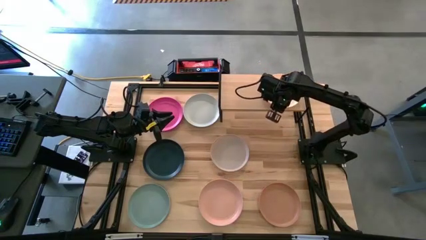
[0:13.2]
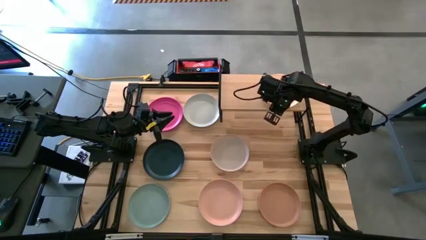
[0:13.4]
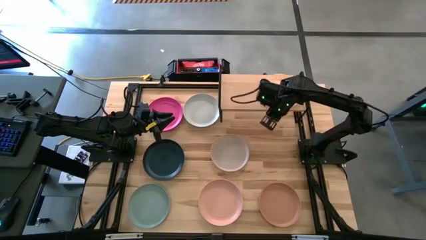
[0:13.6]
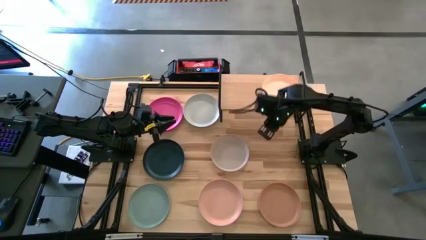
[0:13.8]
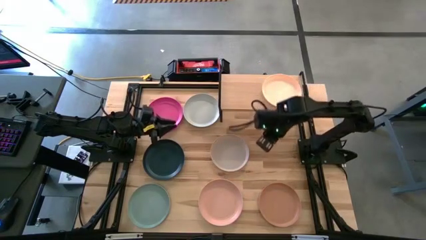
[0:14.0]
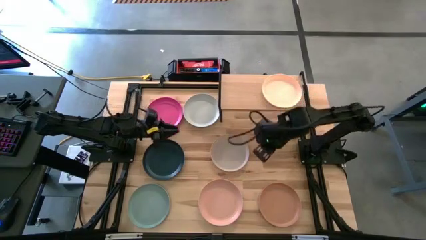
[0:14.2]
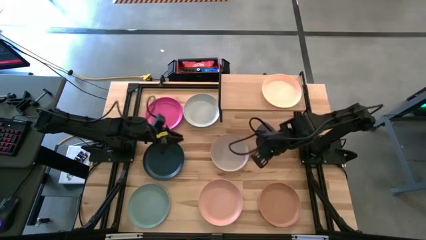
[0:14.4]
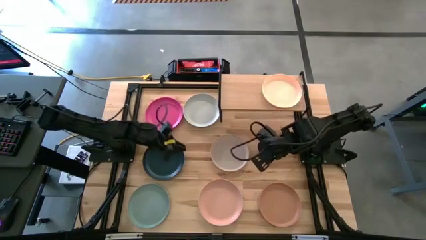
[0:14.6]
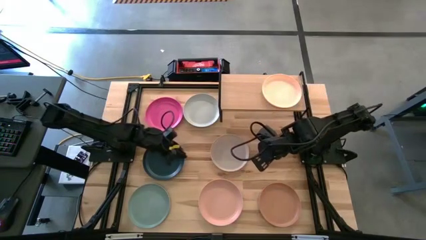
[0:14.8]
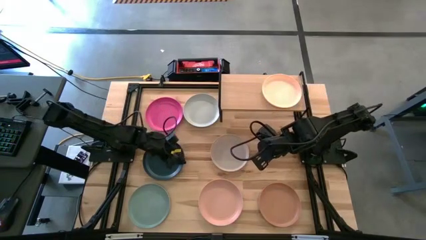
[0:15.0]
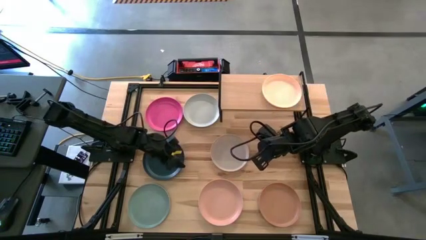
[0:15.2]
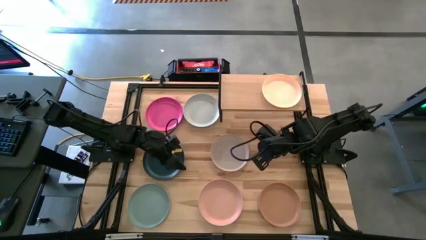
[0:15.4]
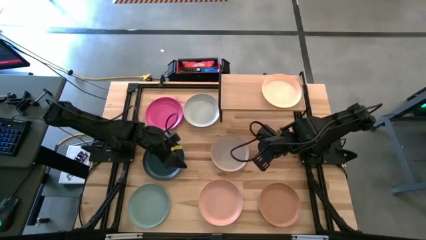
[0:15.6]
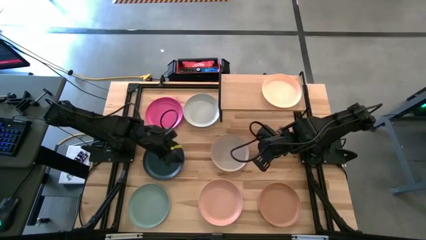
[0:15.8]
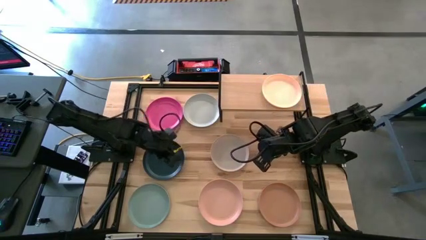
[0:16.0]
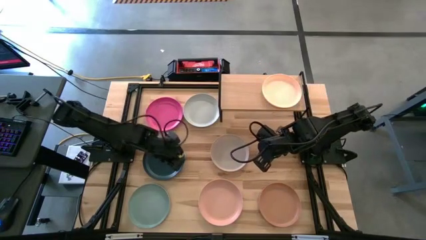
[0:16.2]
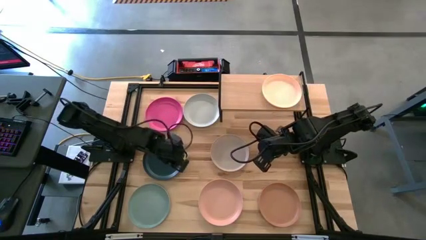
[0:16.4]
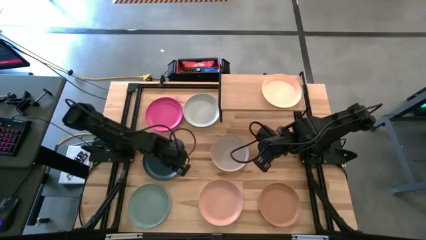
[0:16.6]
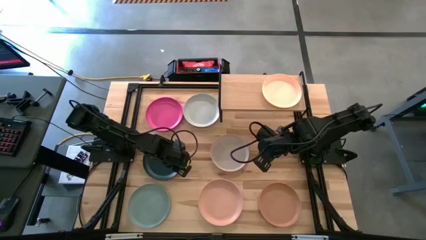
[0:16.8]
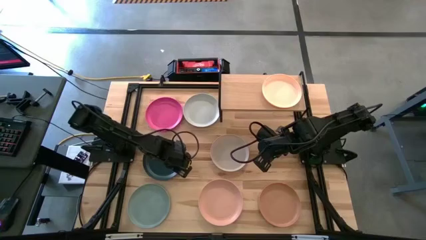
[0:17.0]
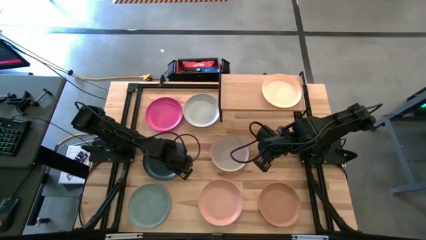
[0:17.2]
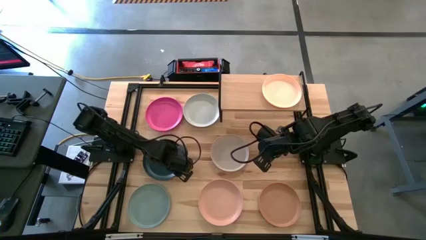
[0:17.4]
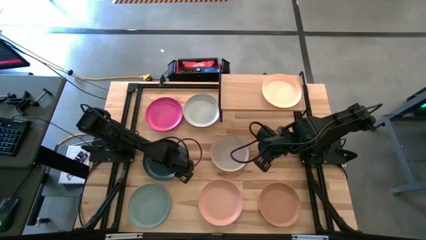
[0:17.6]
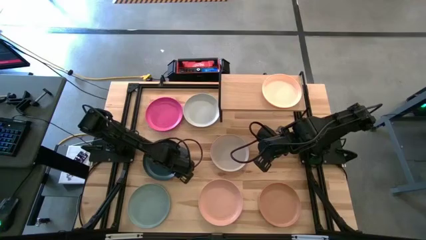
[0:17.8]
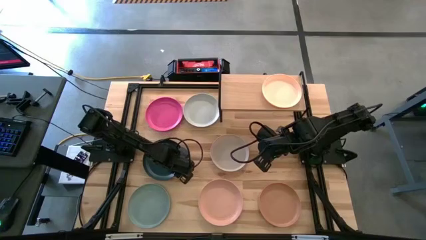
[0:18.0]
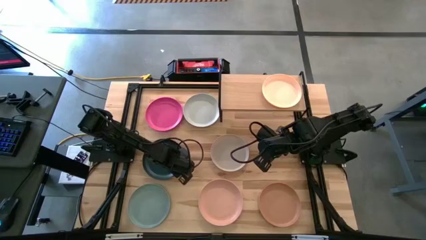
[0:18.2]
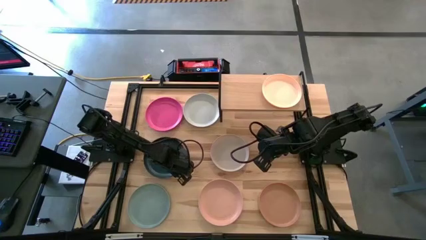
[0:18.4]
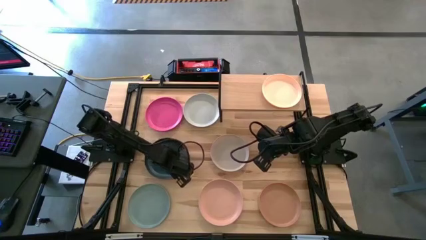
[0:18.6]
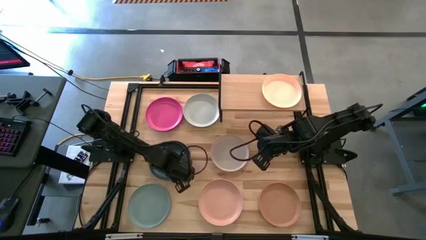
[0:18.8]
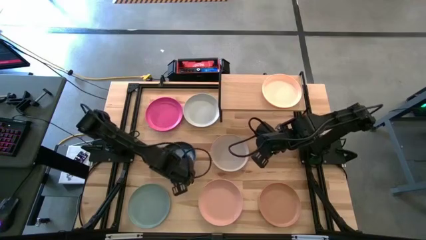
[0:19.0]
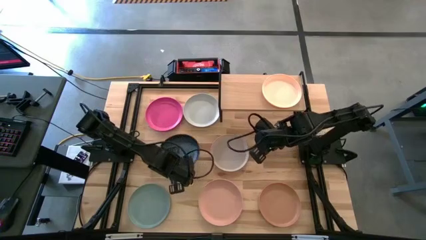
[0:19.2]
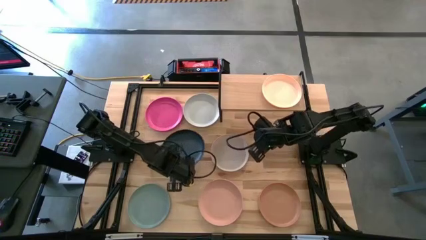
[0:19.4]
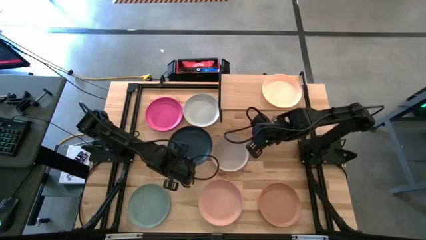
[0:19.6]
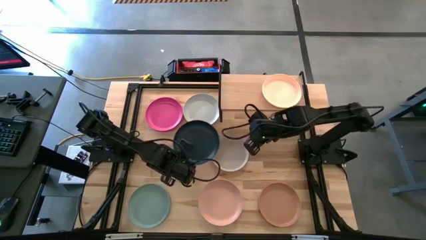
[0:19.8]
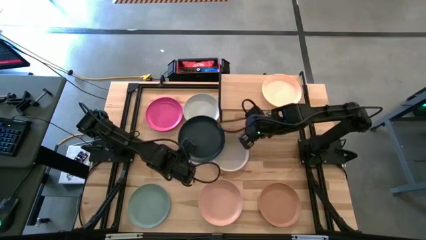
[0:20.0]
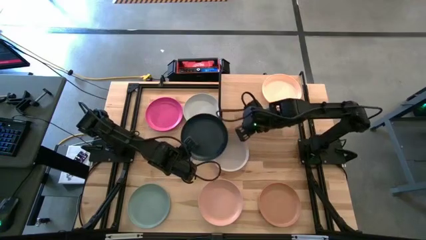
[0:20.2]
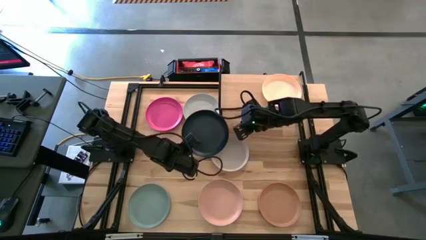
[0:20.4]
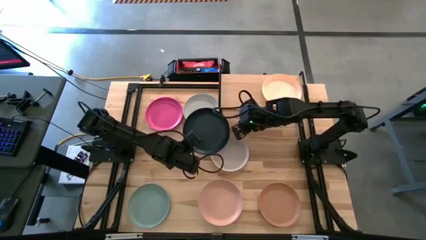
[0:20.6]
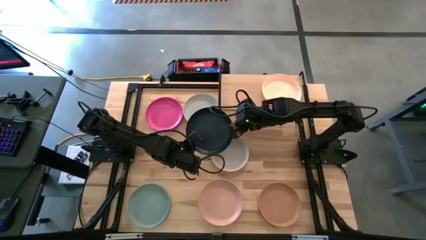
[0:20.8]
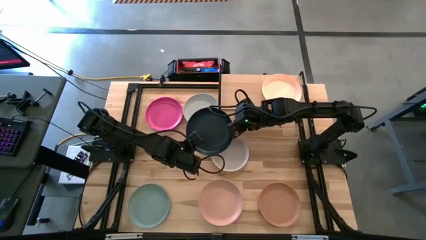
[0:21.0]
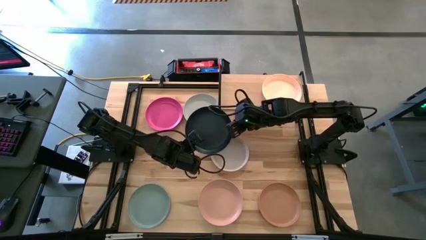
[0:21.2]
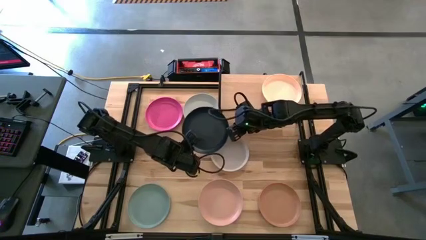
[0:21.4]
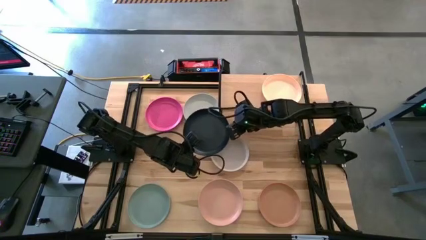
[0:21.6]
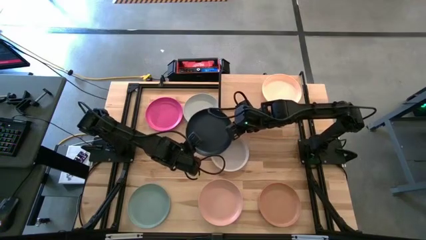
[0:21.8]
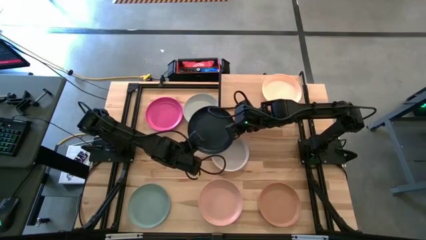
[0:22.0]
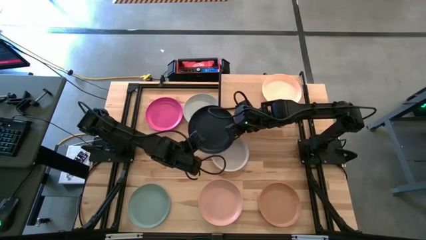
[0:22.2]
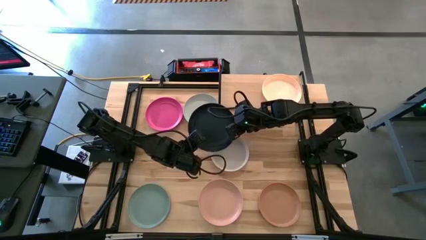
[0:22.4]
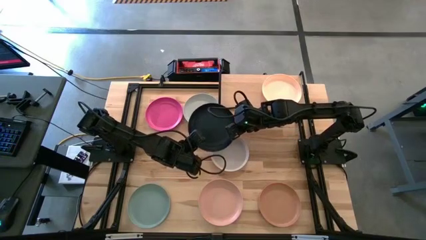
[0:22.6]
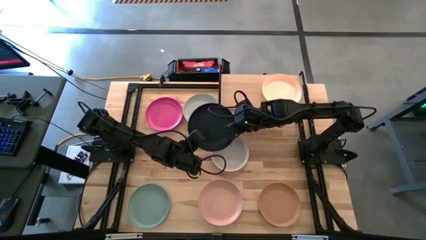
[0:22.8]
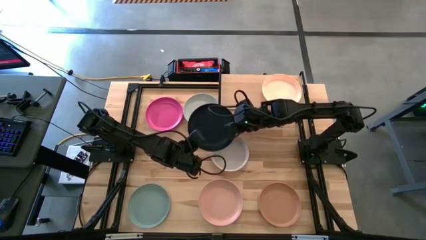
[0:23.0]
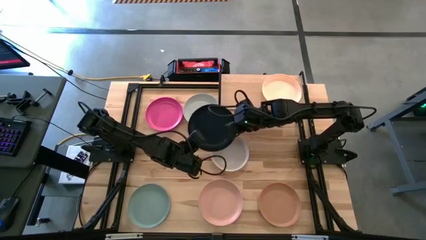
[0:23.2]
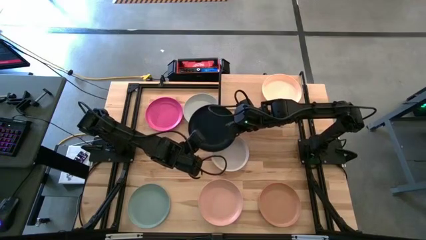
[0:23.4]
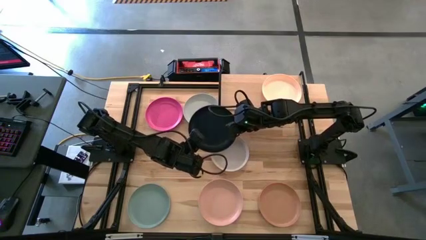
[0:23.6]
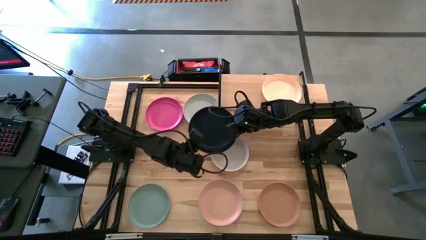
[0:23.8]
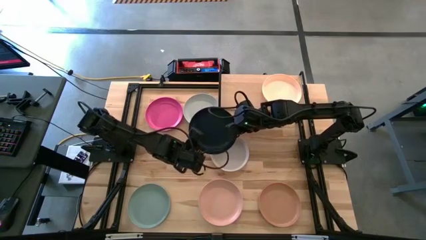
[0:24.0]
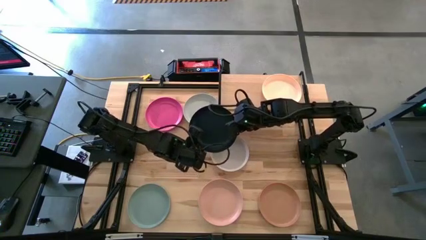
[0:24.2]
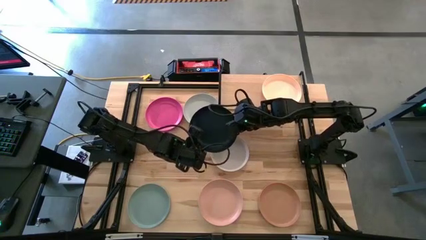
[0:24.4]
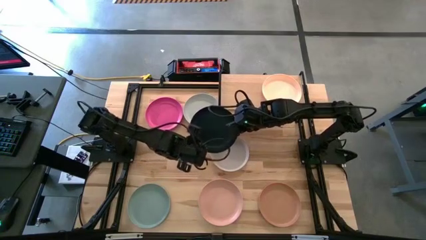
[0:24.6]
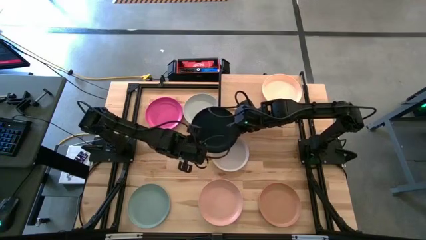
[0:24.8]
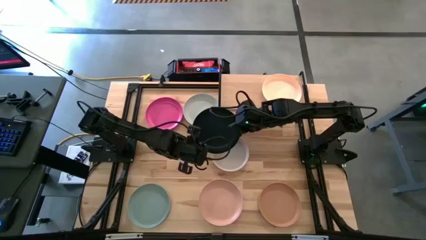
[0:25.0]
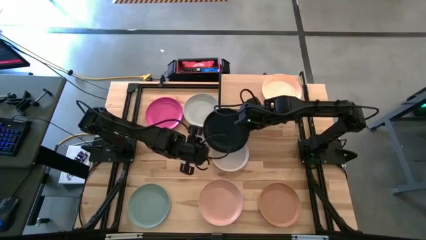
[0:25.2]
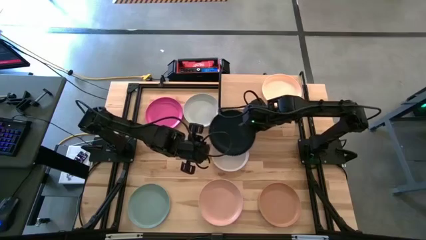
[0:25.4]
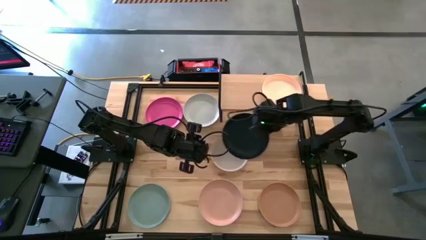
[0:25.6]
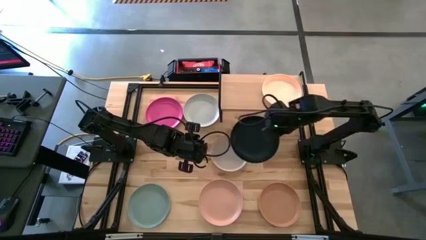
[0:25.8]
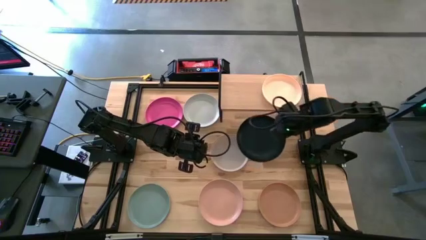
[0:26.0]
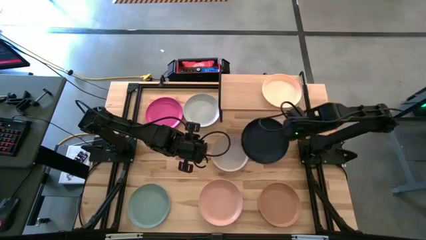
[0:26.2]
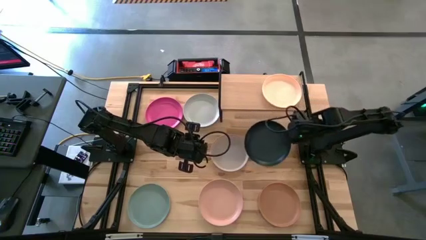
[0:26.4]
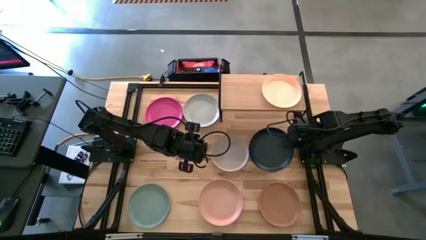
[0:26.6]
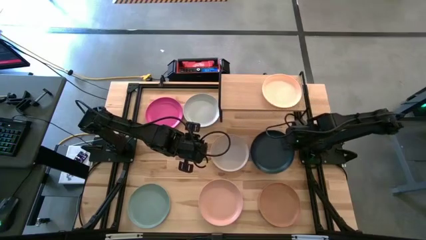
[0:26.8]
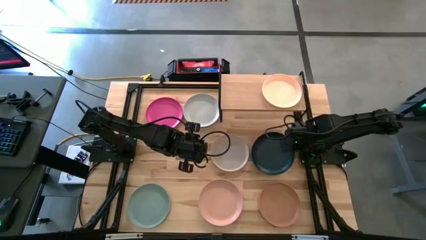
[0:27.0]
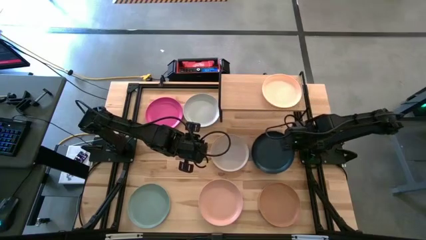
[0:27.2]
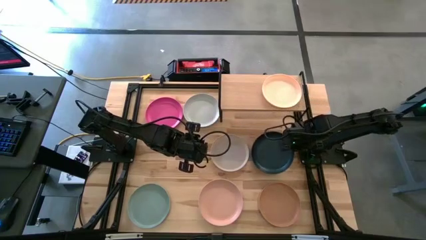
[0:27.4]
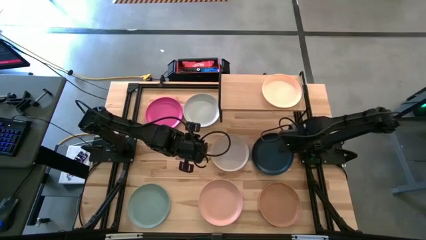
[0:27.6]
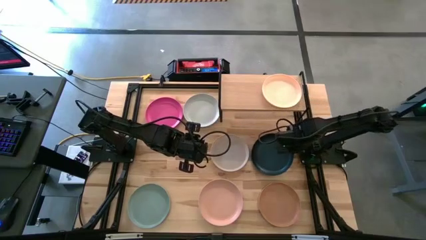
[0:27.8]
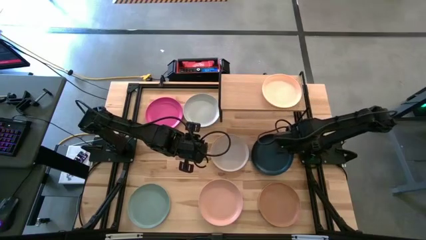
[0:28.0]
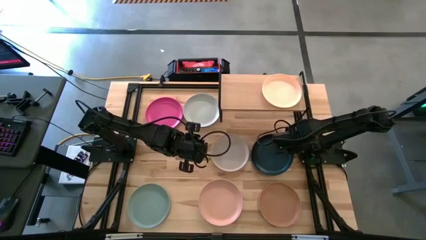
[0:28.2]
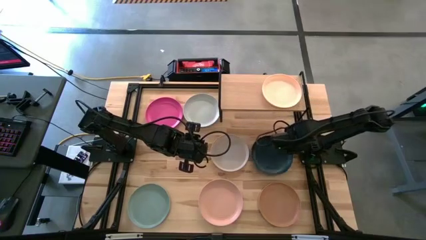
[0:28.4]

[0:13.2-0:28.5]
Task: Place and stack plates onto a shelf
Move the blue plate to the middle right of the table
